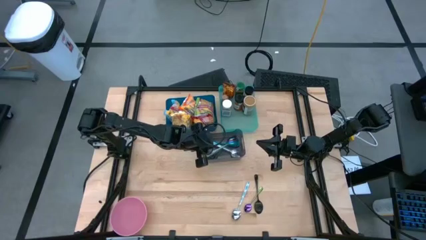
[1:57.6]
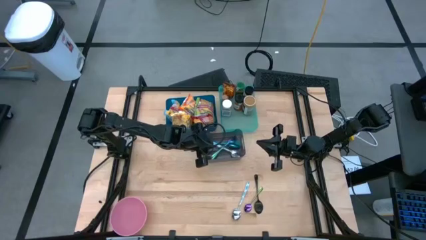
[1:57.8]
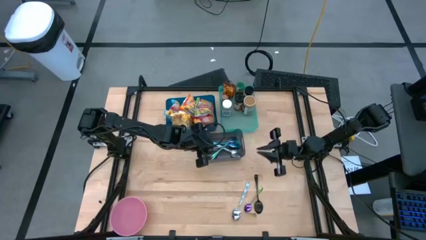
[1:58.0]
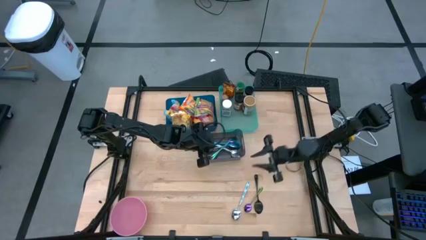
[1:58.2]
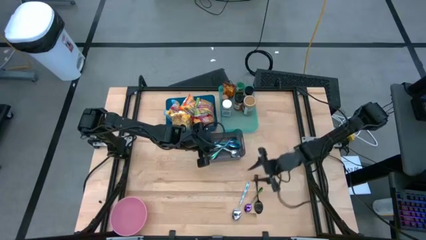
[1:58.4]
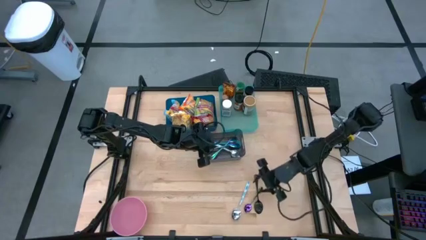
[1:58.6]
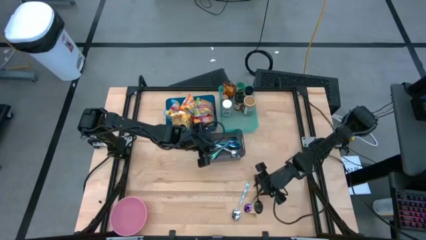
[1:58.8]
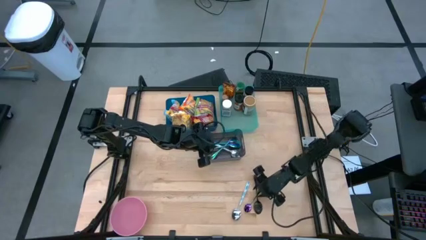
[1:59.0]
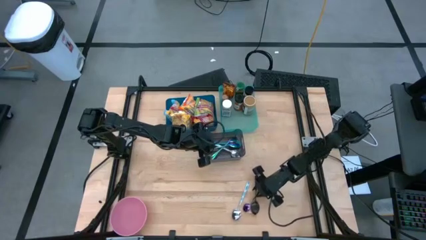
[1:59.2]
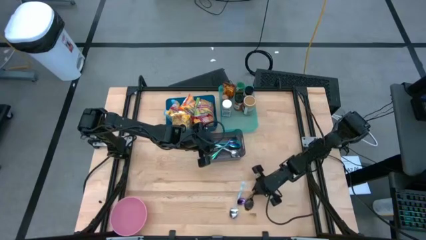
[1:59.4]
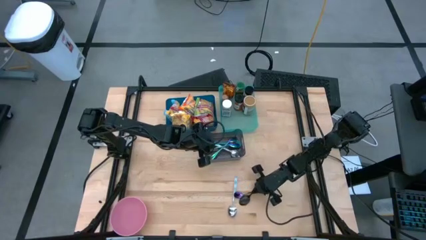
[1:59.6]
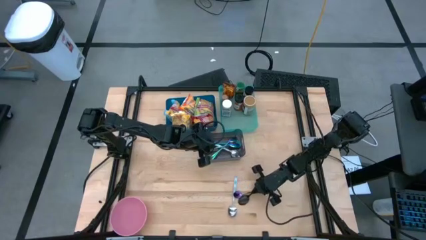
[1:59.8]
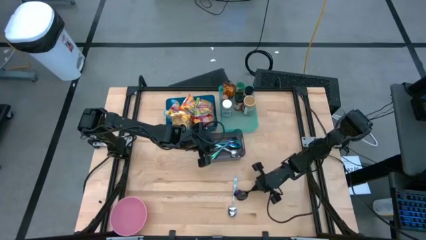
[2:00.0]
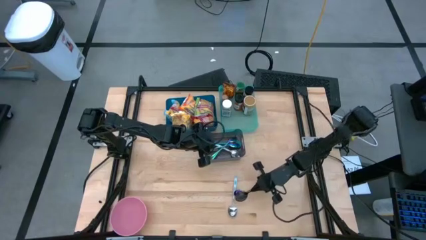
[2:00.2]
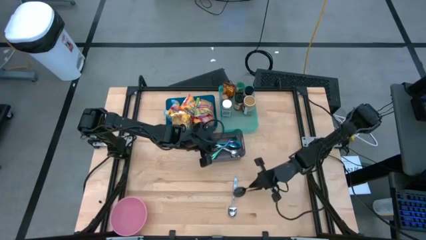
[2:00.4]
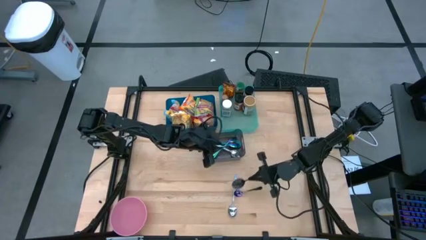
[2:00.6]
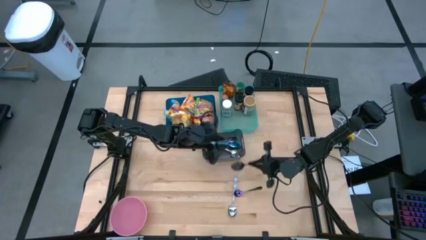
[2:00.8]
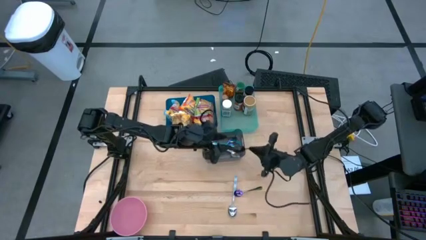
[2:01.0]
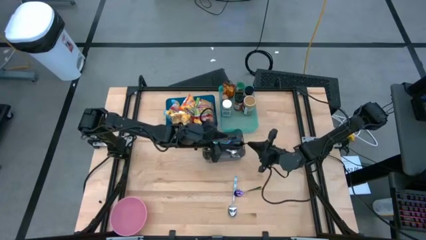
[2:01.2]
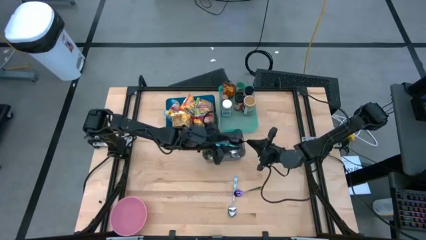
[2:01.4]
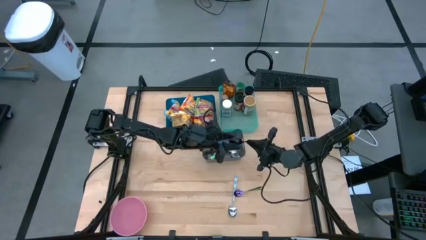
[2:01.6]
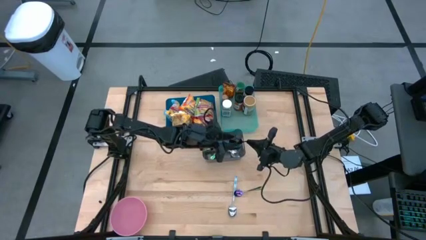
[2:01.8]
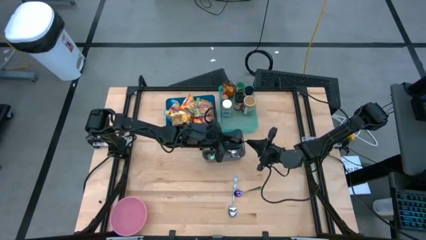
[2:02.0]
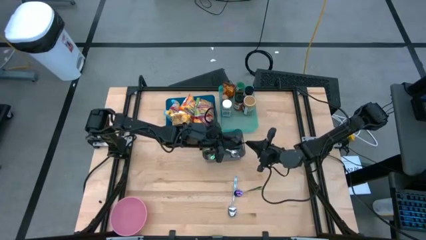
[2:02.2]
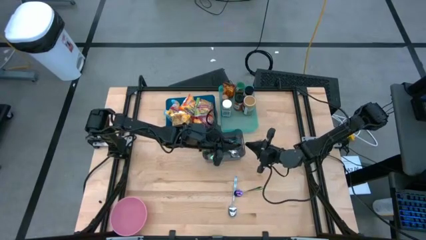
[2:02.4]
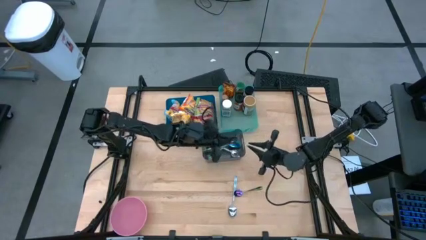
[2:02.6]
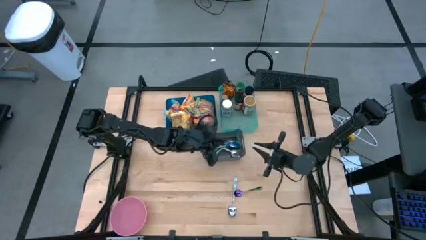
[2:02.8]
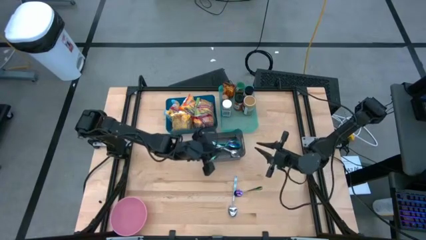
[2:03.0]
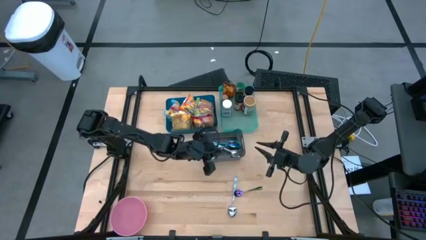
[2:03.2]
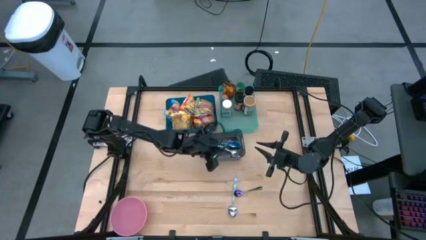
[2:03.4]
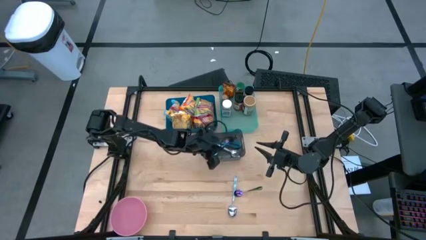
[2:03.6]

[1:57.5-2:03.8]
Task: Pick & Place Food Item
Put the black spoon into the black bin

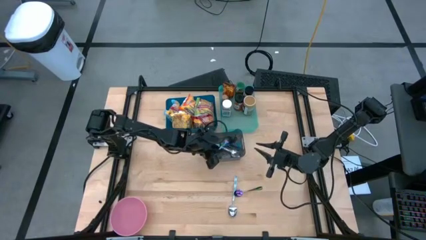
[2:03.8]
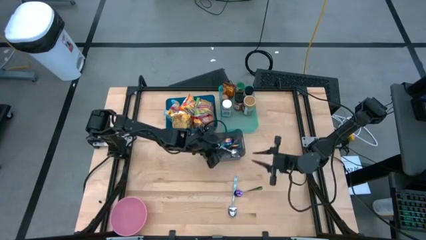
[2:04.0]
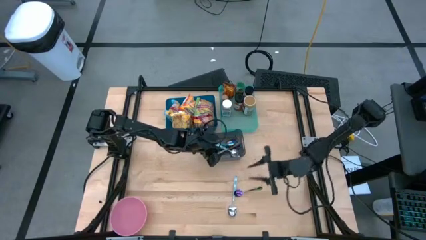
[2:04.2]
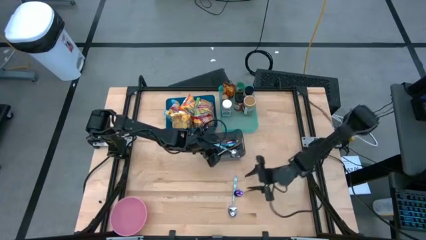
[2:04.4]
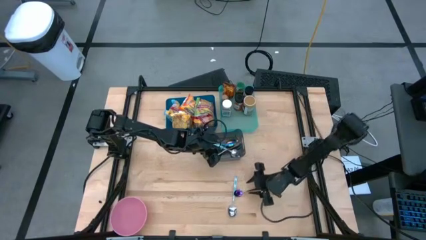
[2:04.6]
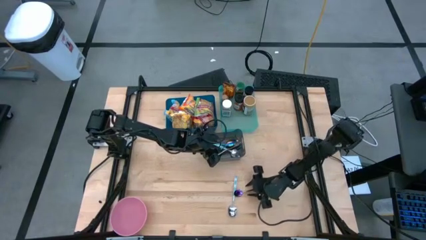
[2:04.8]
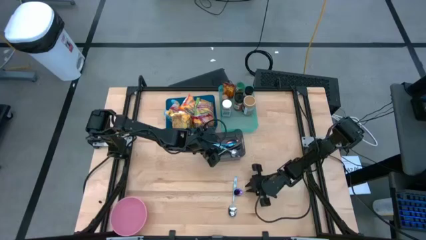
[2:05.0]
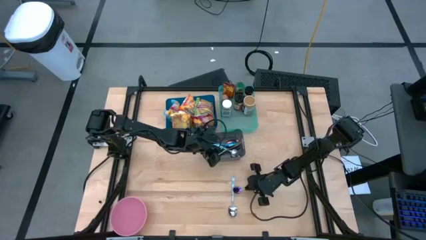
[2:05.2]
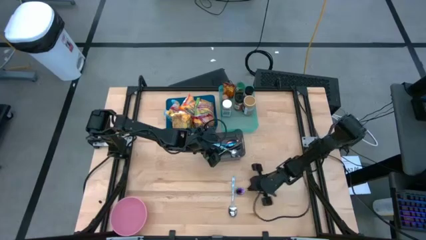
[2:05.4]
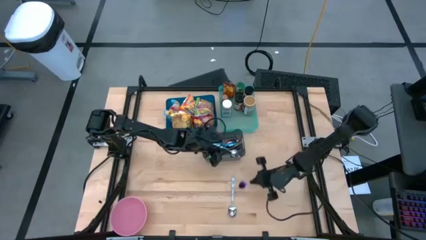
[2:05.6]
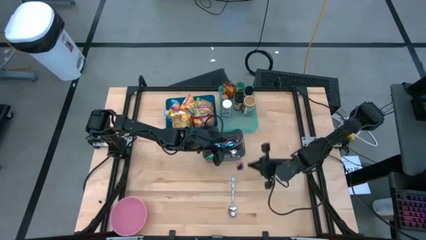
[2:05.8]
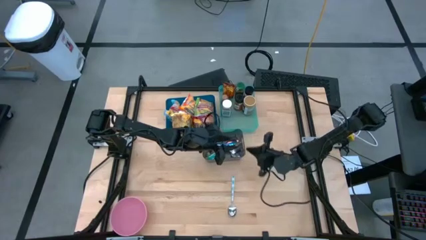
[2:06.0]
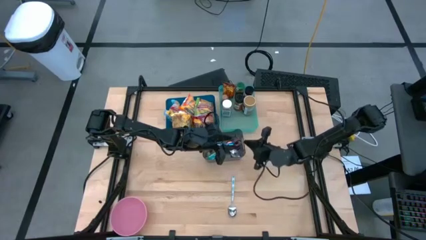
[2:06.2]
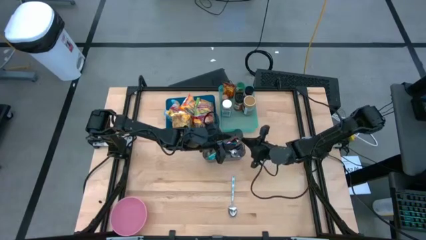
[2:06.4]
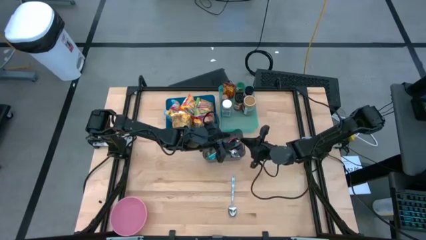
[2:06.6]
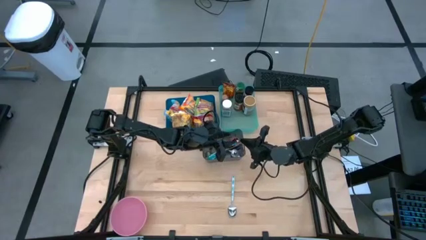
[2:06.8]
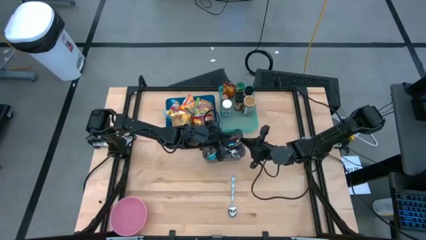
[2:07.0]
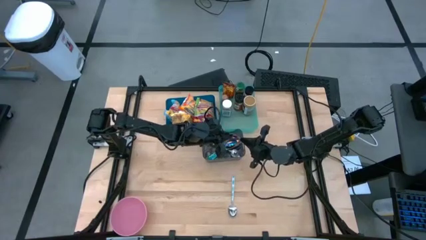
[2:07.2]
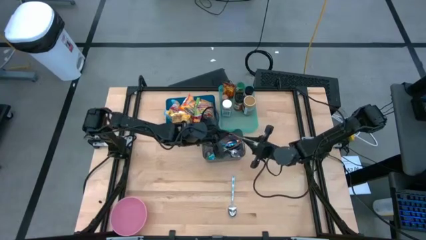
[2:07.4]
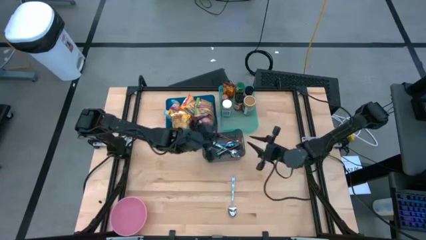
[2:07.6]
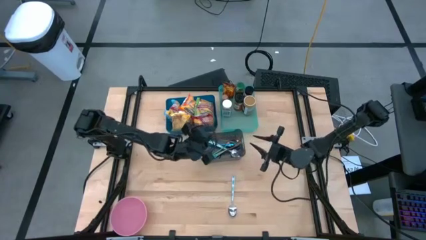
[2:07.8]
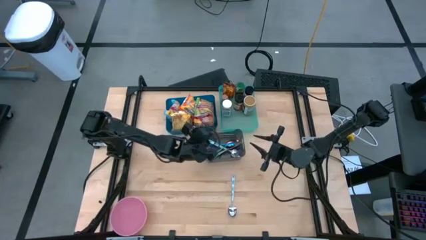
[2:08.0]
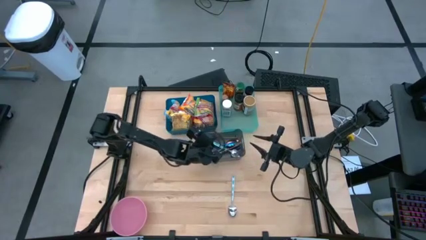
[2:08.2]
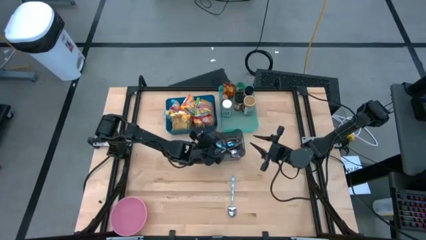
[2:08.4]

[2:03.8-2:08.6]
Put the violet spoon into the black bin

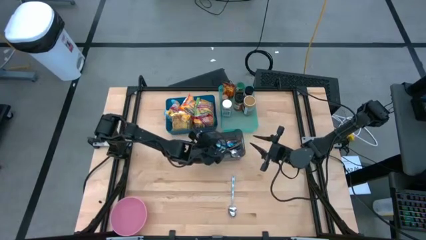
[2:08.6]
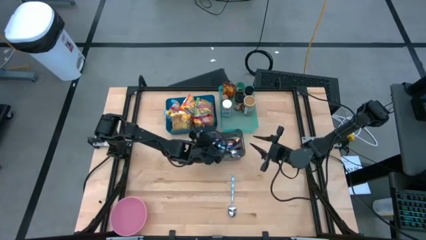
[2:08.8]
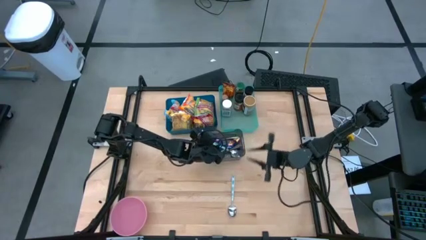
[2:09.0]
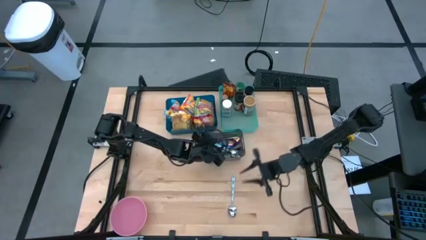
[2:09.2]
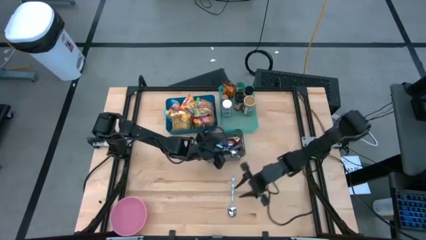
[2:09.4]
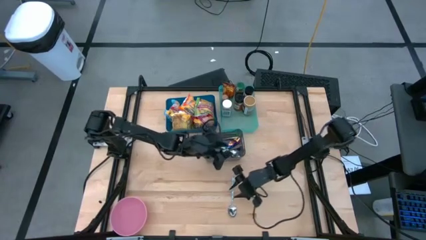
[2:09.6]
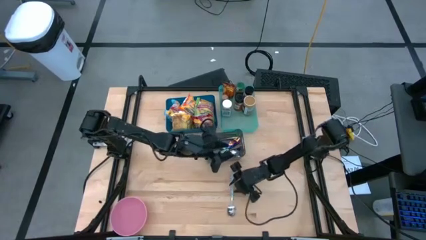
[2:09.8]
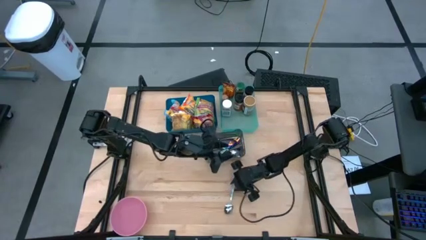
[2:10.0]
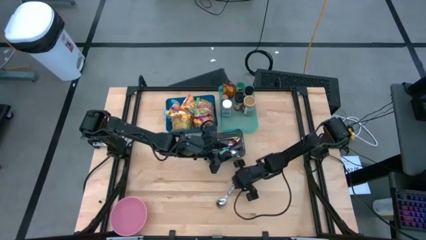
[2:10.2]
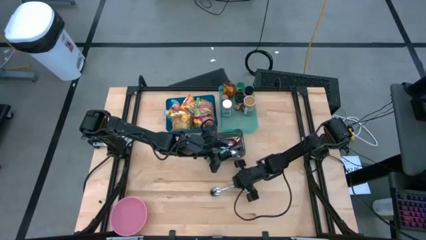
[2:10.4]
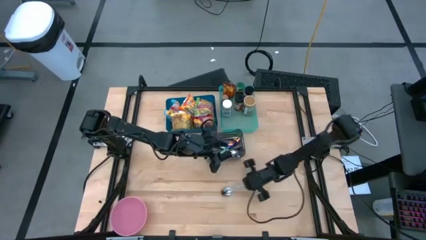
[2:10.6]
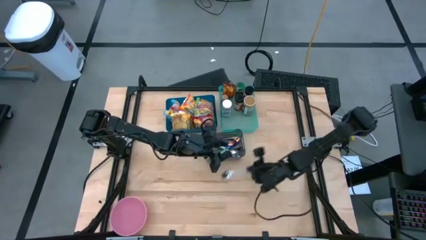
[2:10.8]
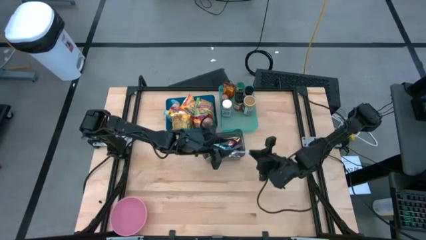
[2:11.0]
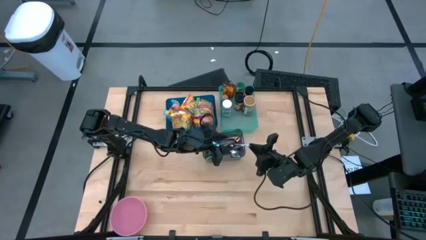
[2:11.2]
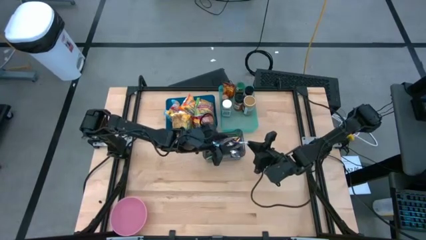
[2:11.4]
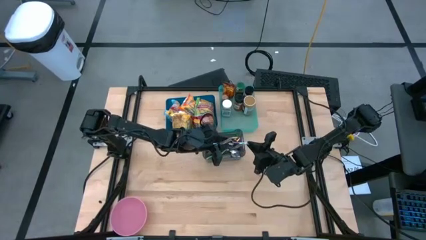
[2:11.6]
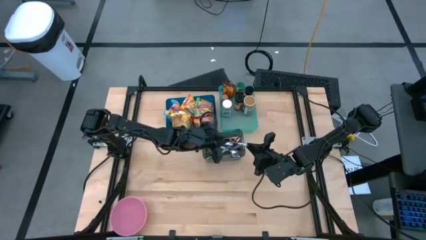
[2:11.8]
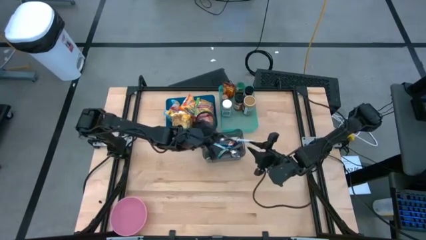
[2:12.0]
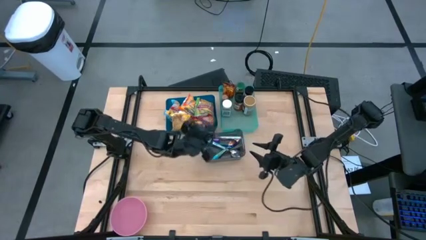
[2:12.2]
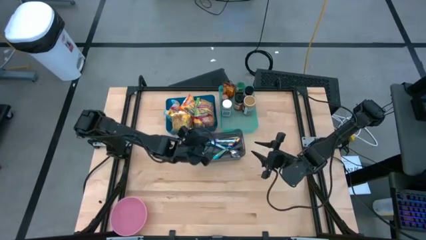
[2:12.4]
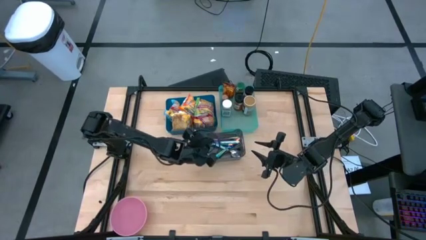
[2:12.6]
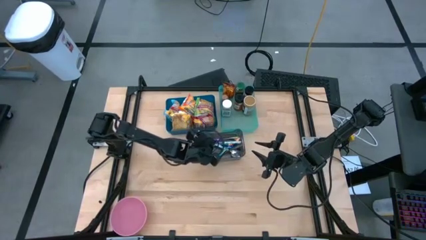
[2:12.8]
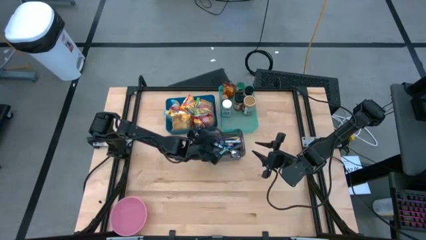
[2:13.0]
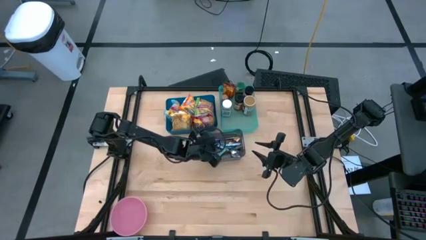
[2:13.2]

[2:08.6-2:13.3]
Put the blue patterned spoon into the black bin

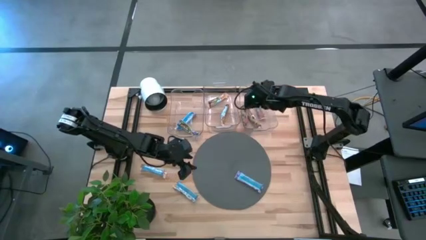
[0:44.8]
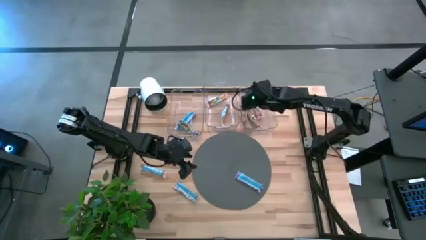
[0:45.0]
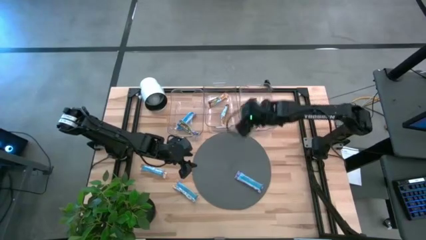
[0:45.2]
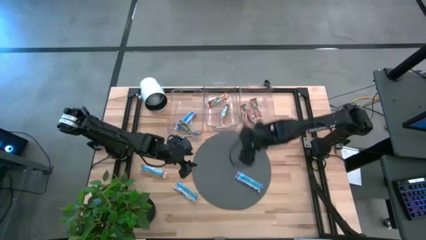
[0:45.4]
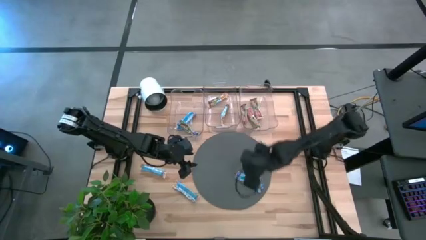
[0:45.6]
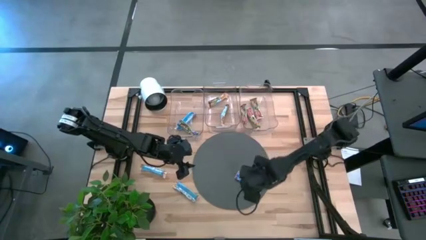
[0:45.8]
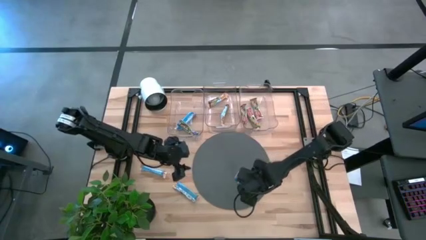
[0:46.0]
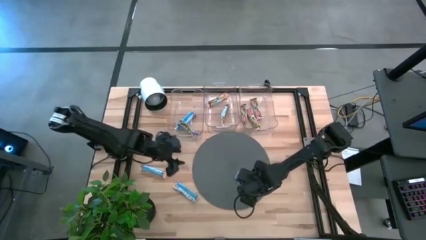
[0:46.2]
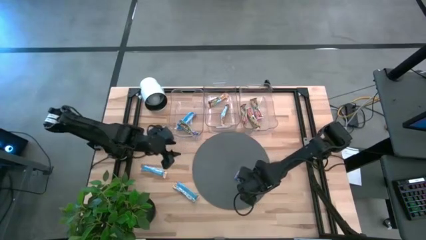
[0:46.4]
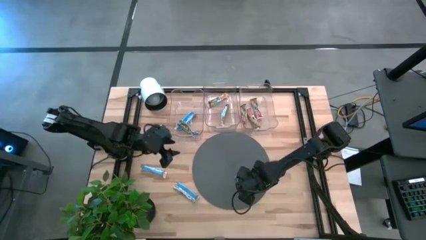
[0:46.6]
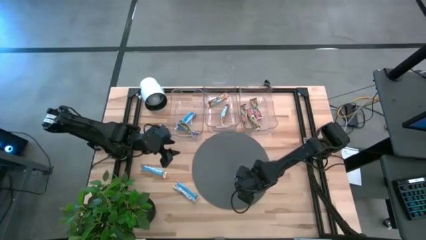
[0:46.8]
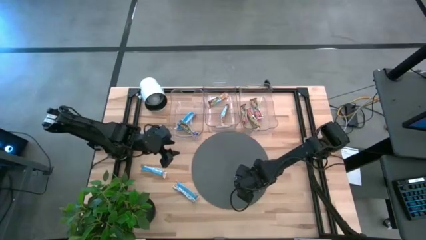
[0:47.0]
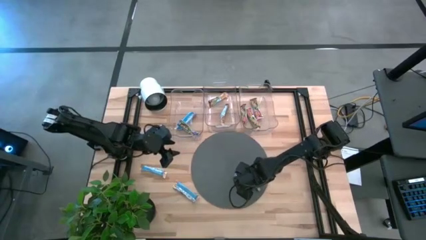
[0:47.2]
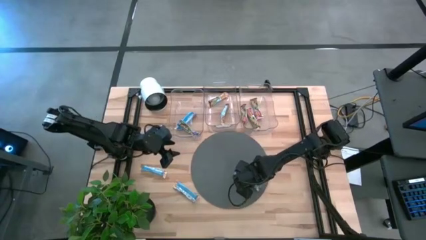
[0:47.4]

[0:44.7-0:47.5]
Task: Pick and place Granola Bars by type
Put the blue granola bar into the left bin
